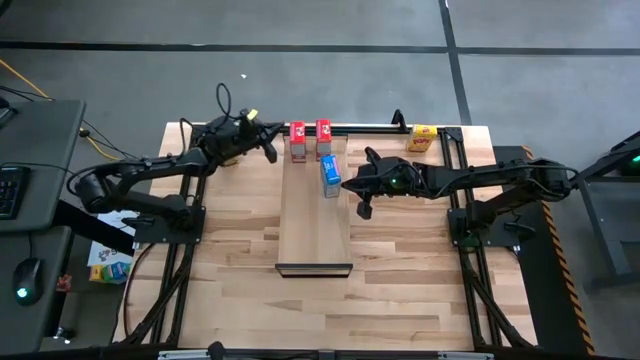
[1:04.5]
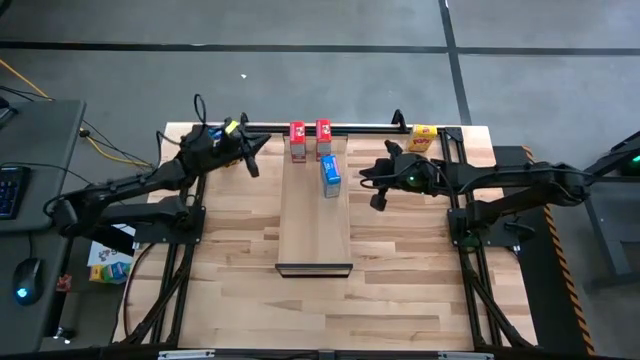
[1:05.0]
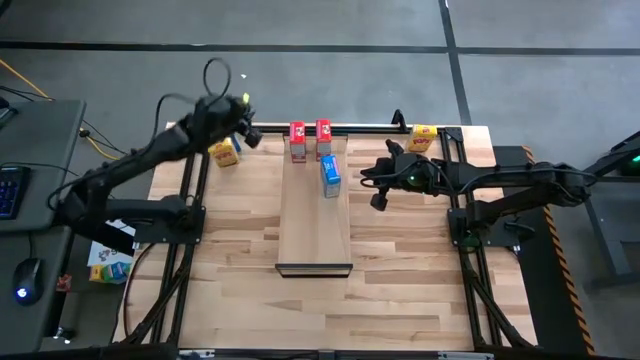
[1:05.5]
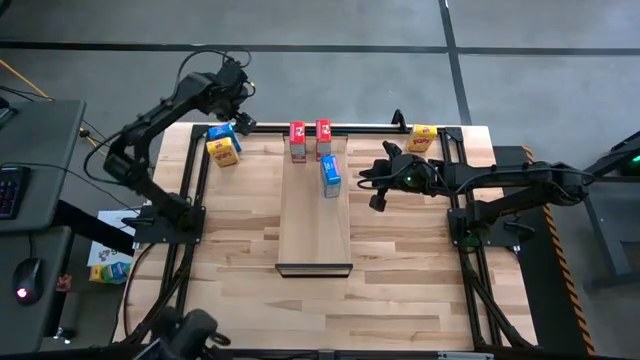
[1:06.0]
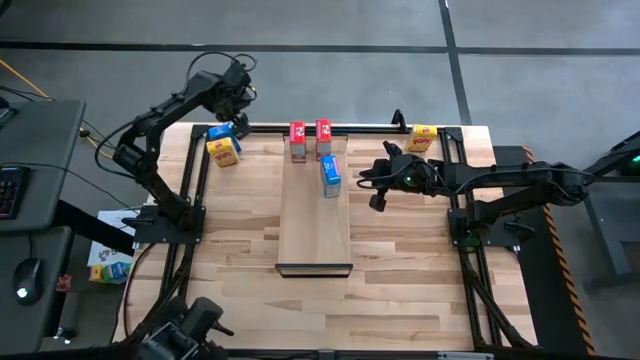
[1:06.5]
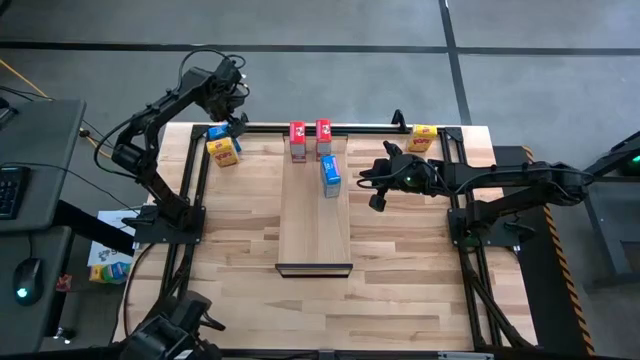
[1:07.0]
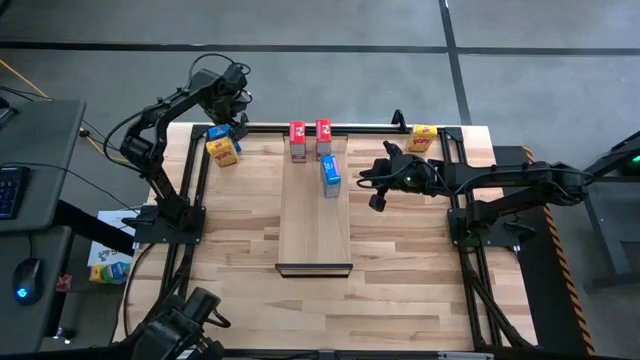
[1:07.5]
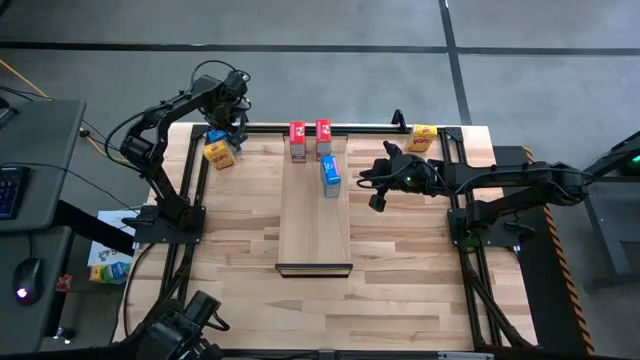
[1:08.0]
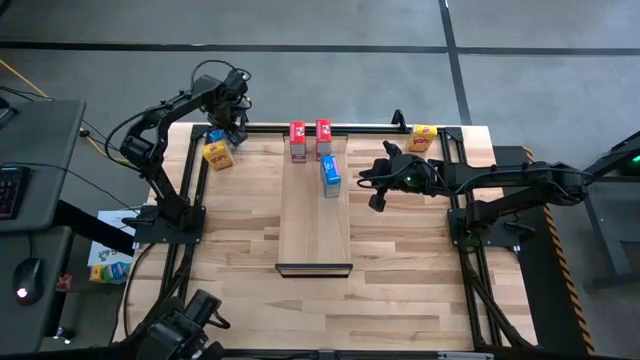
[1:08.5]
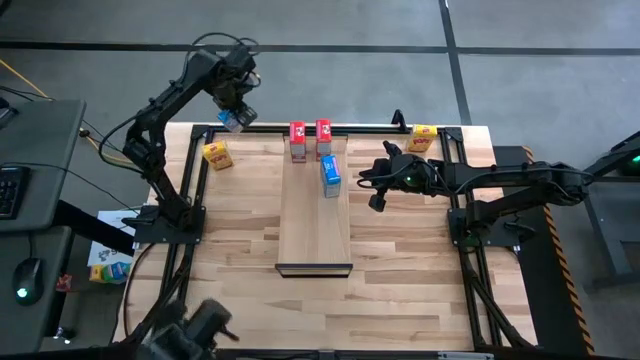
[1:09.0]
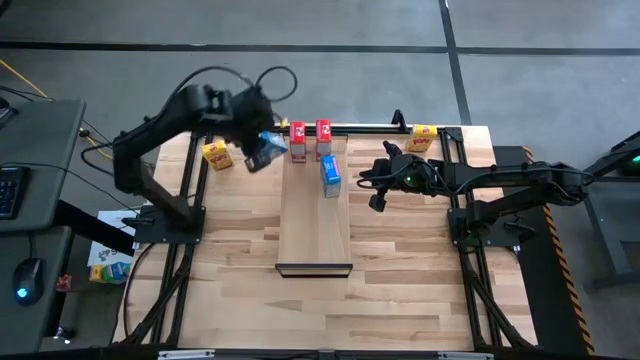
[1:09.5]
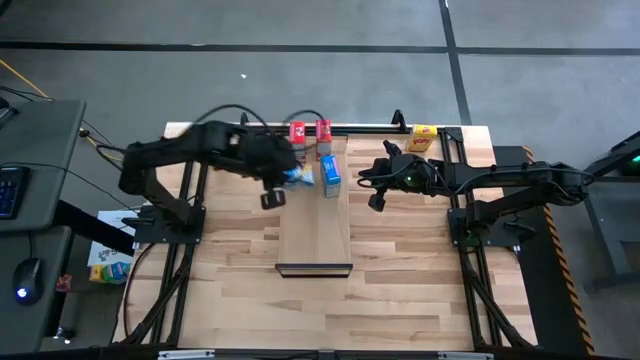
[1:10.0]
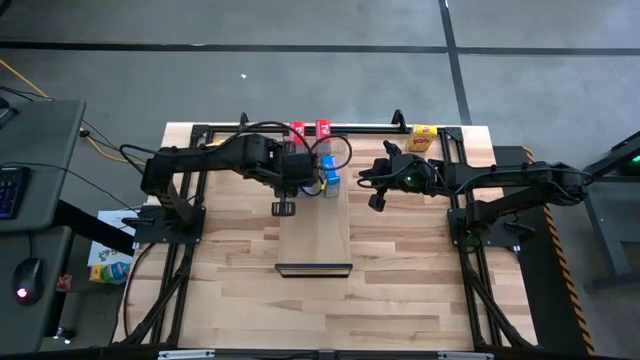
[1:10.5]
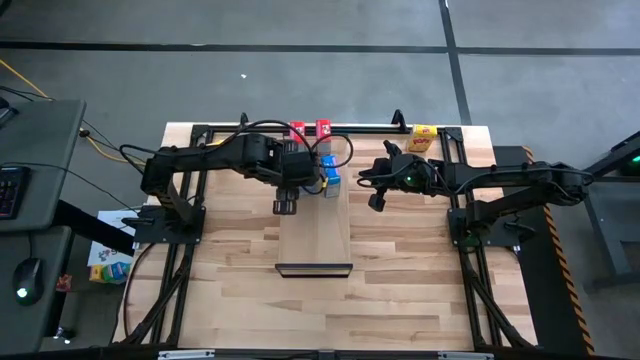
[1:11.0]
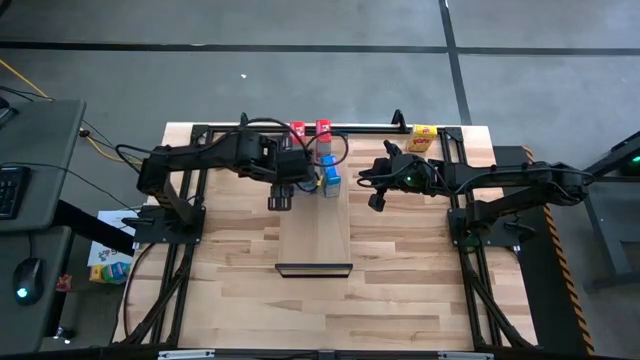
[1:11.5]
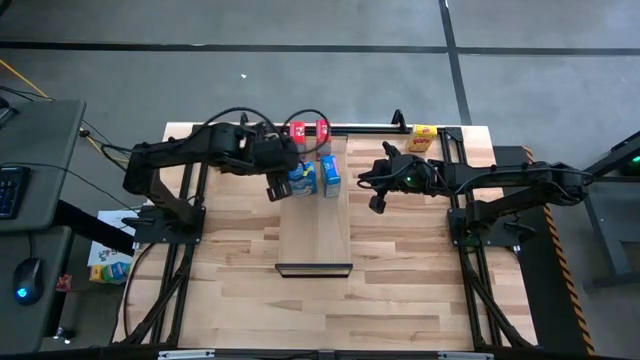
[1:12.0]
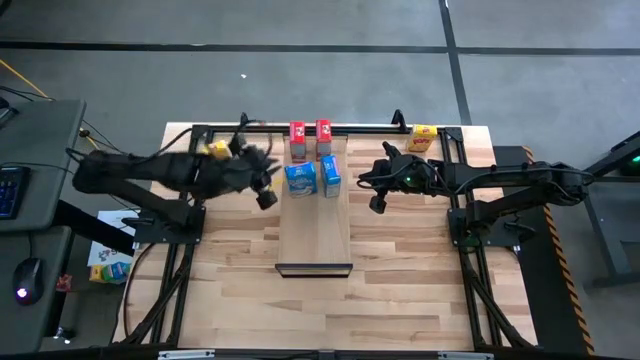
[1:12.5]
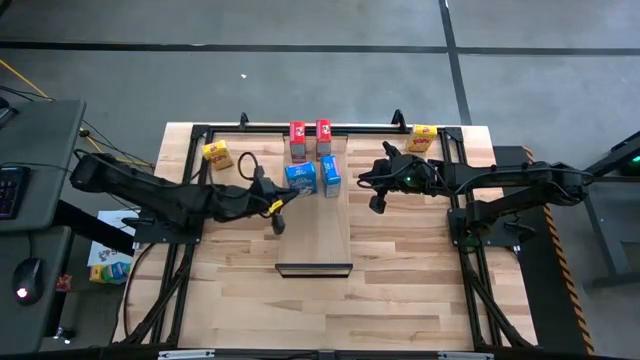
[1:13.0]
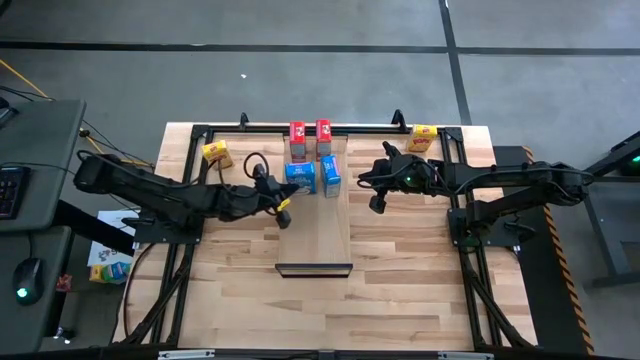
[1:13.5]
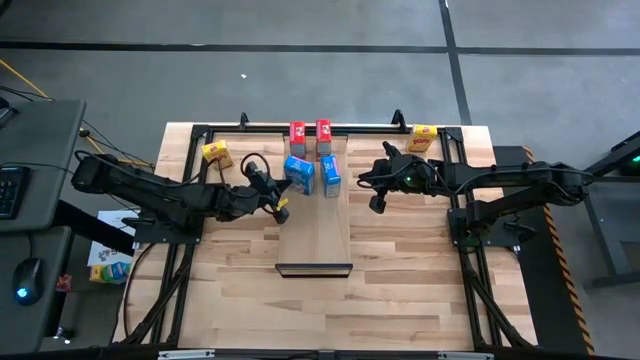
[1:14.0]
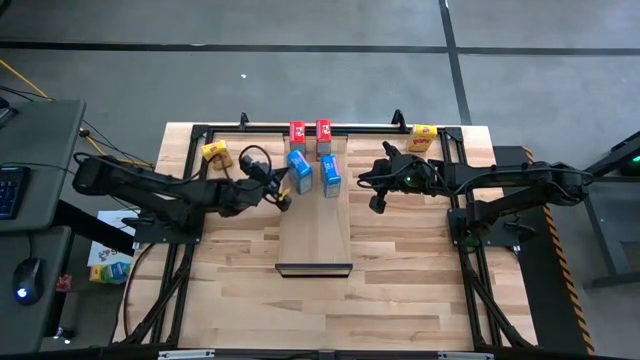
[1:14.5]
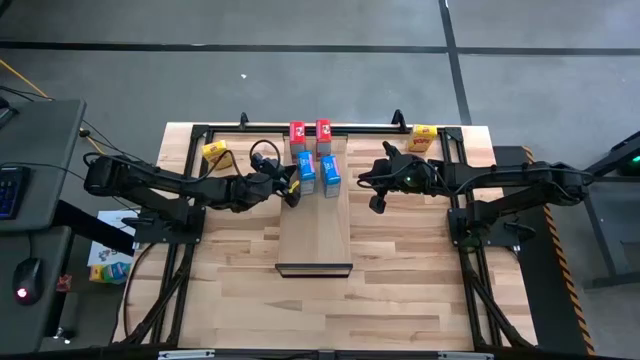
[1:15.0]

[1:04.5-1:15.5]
Task: Stack cereal on shelf
Put the blue cereal box and aligned with the blue cereal box on the shelf

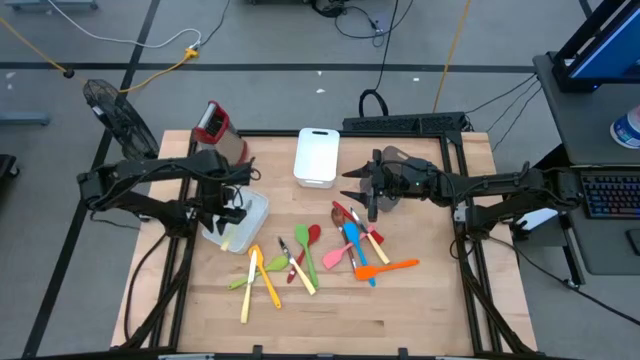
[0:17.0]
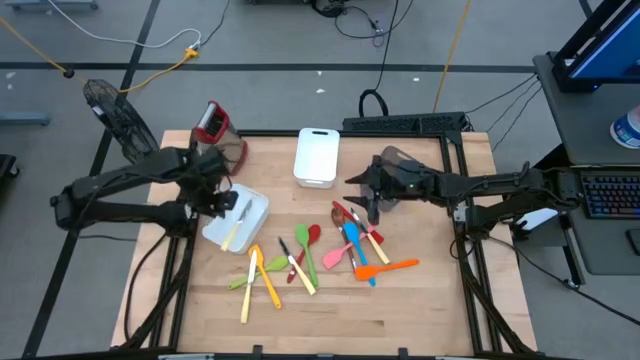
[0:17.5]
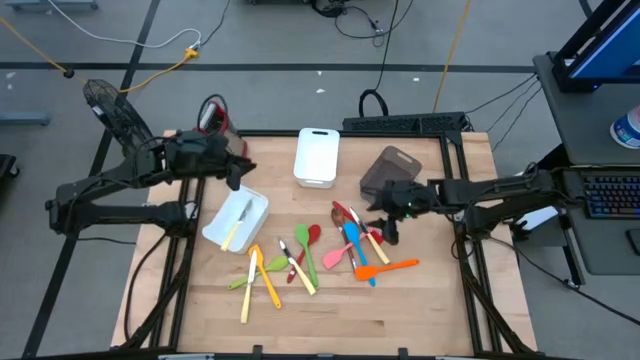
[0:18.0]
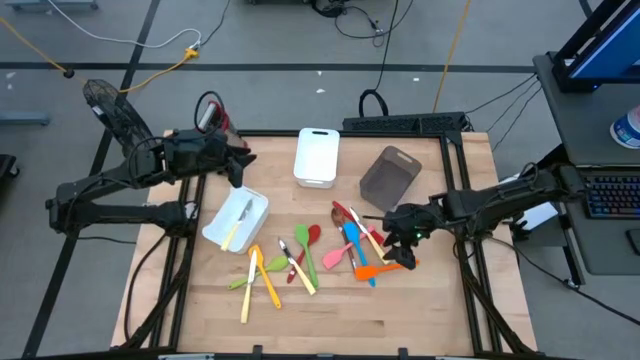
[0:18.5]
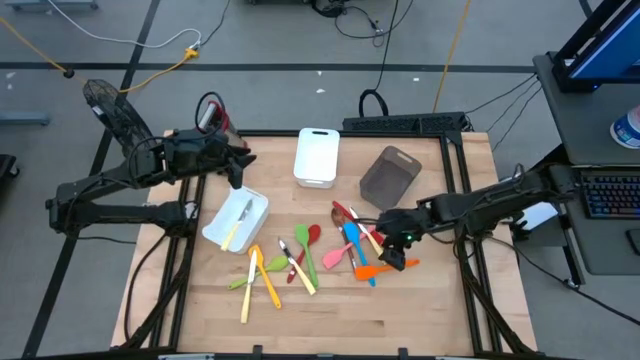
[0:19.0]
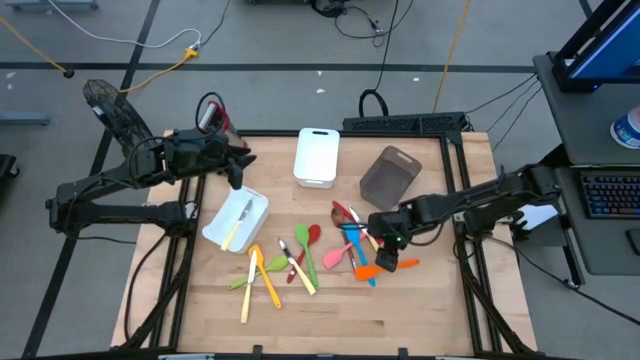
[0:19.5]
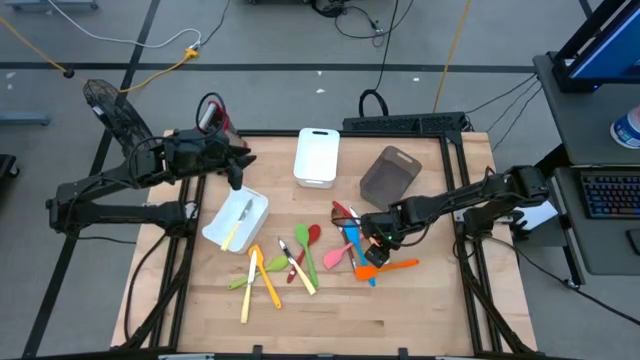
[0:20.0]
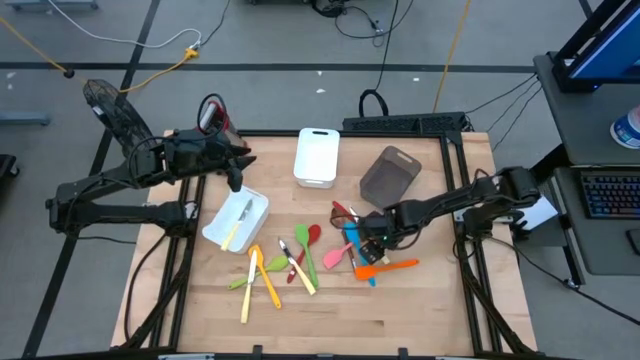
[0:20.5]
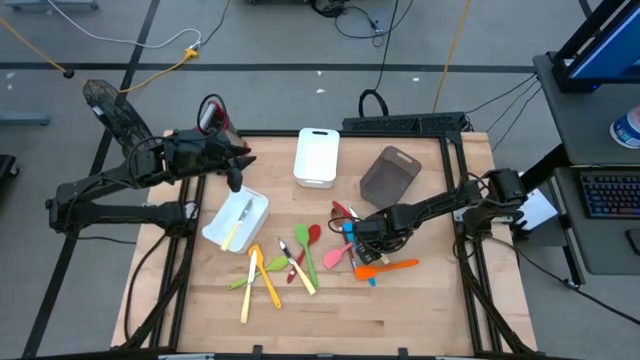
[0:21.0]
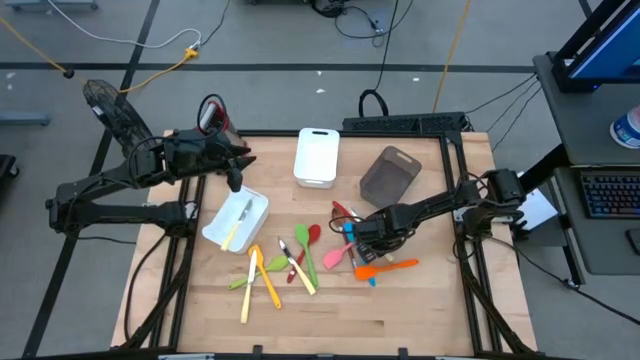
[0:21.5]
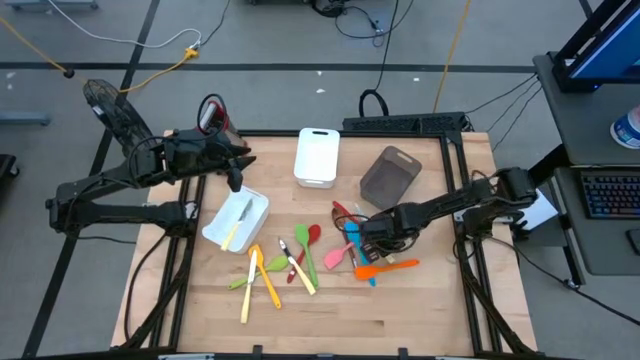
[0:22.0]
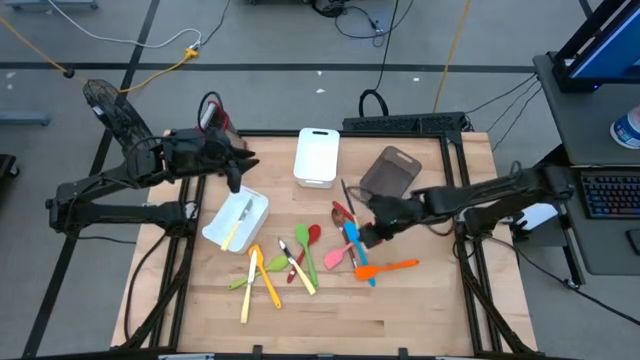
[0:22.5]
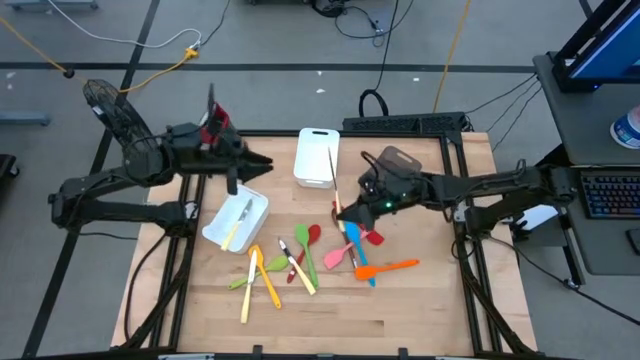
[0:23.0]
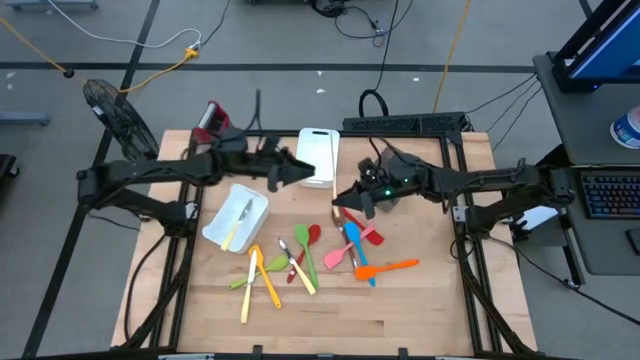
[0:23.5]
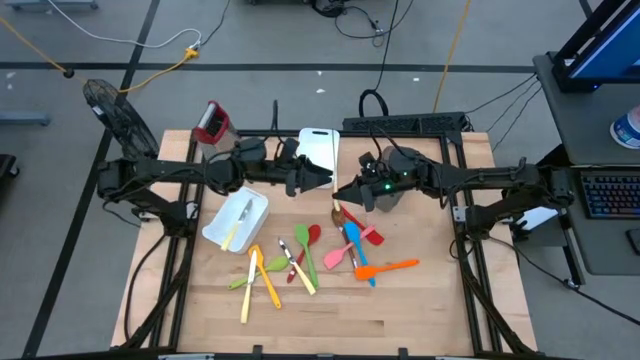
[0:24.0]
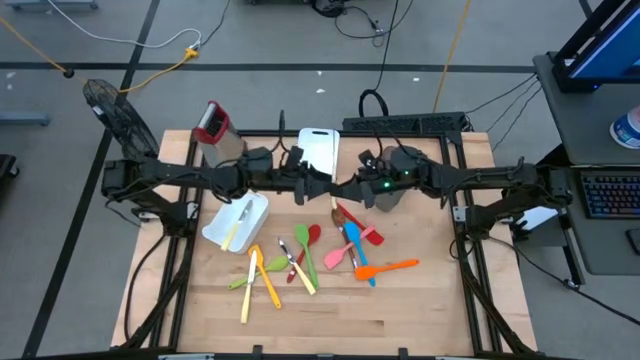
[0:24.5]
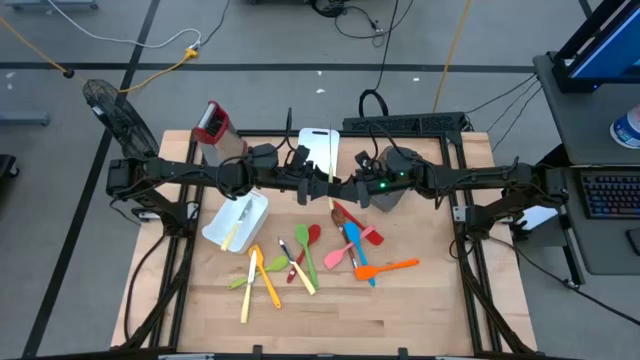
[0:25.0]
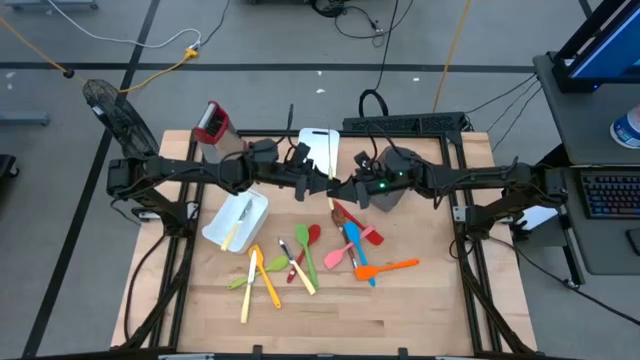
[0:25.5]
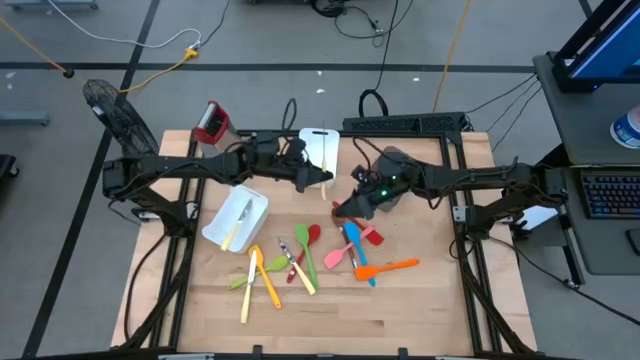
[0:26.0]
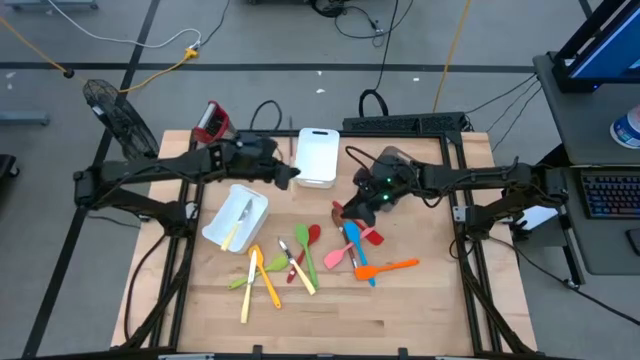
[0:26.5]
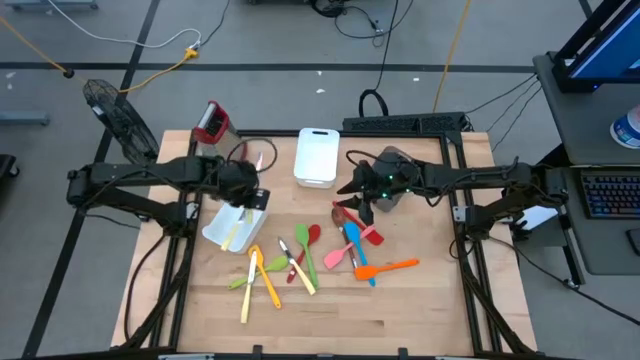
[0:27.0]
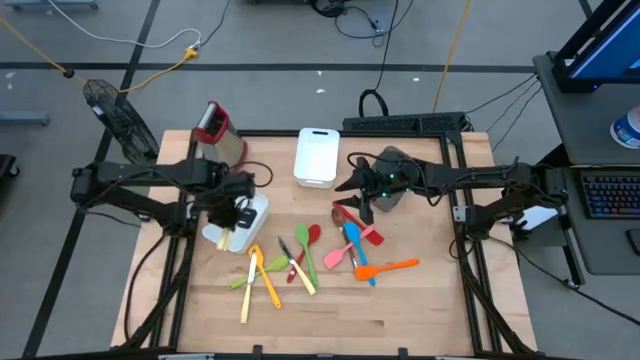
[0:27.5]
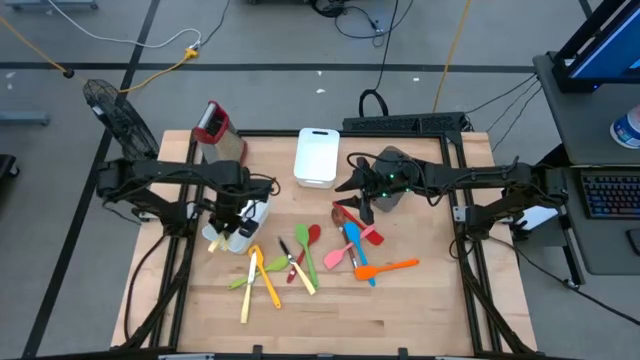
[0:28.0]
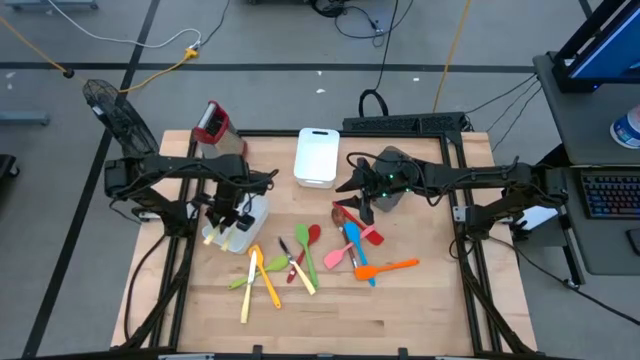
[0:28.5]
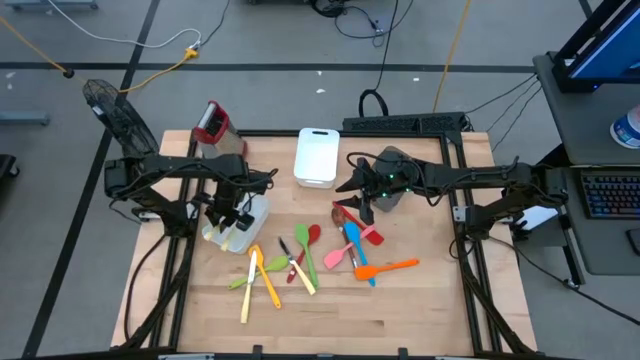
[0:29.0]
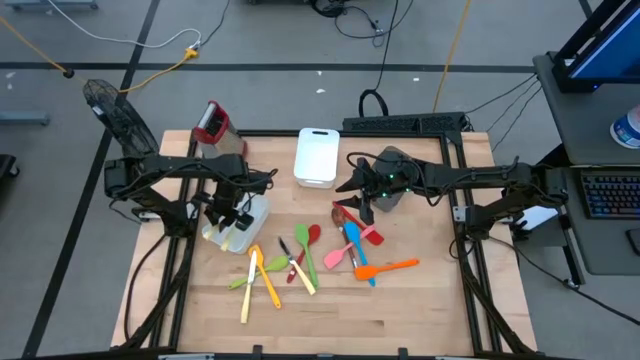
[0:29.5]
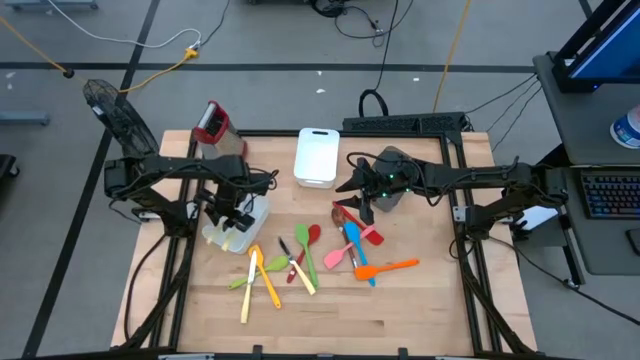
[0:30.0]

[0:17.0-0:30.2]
Task: Pick & Place Kitchen Items
Put the yellow table knife into the bottom white bin
